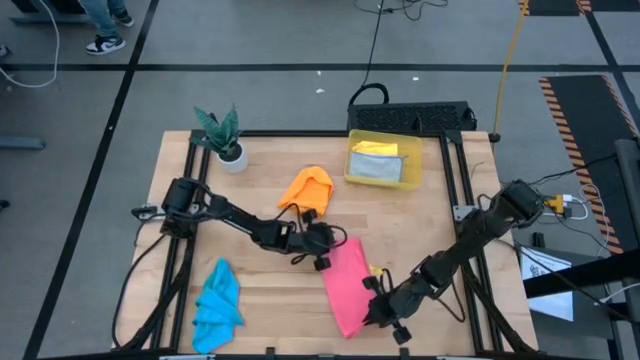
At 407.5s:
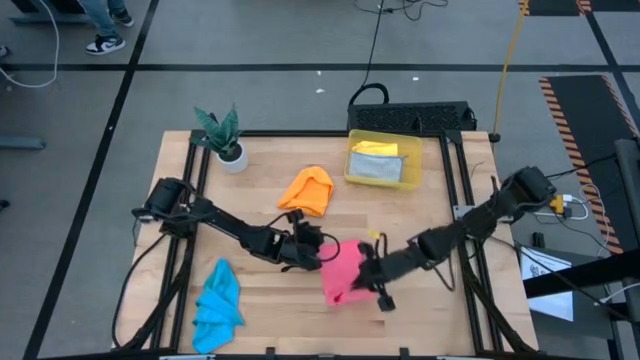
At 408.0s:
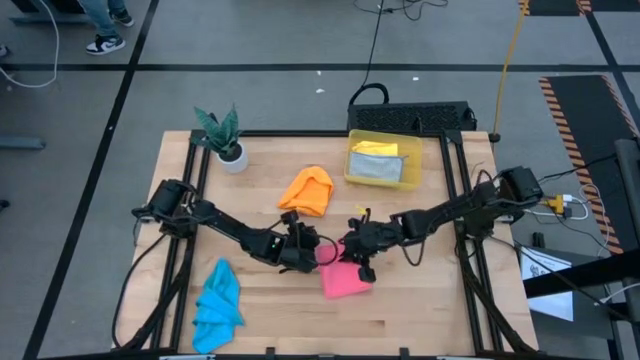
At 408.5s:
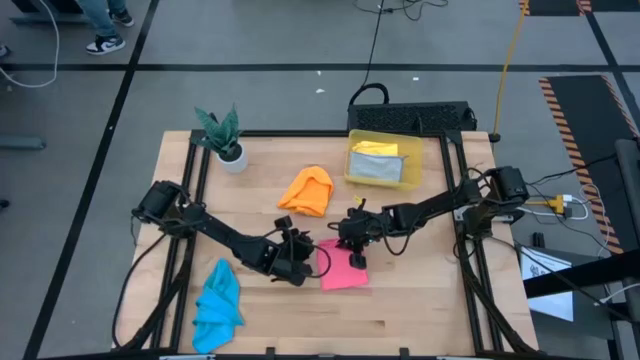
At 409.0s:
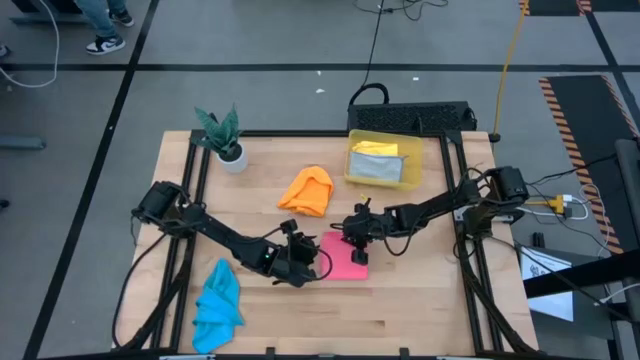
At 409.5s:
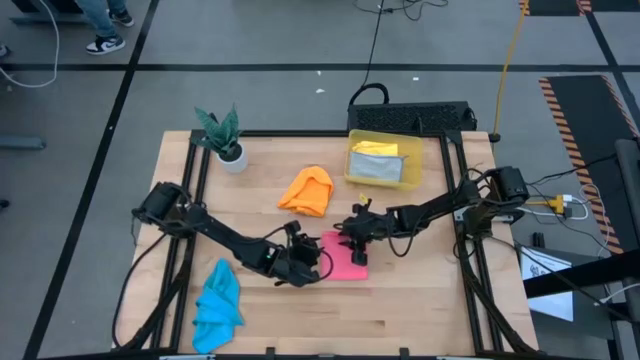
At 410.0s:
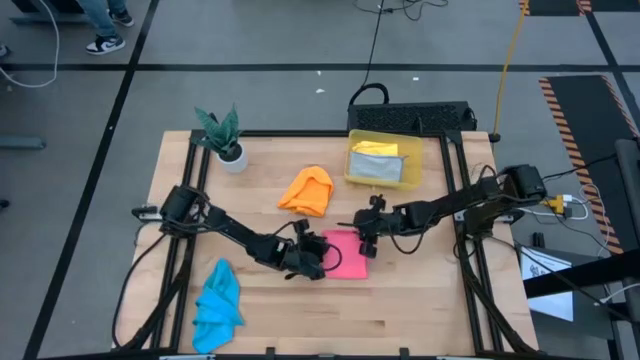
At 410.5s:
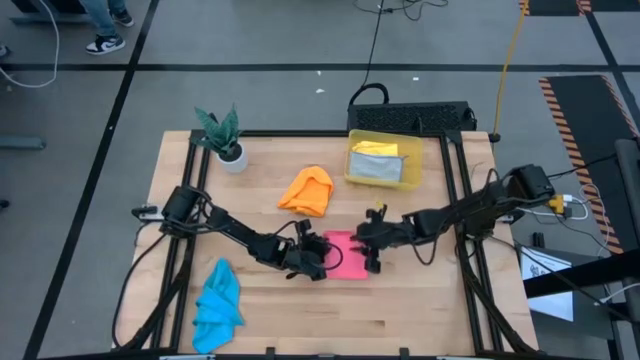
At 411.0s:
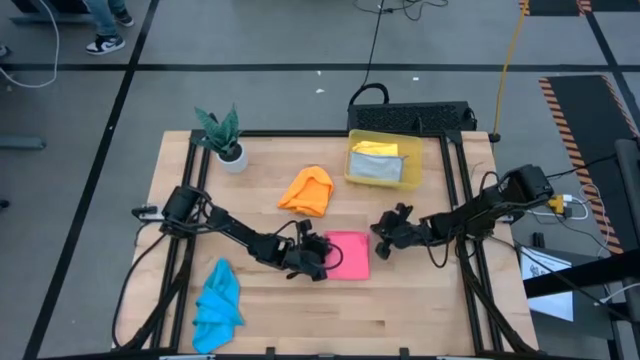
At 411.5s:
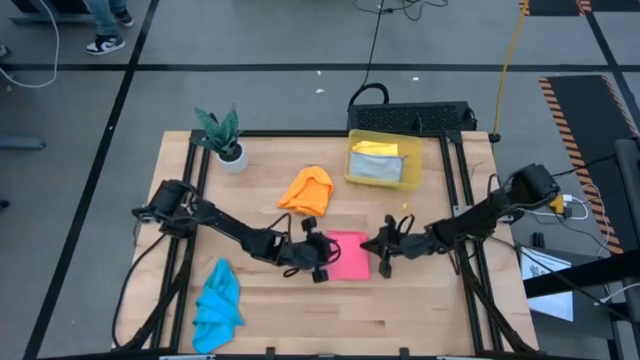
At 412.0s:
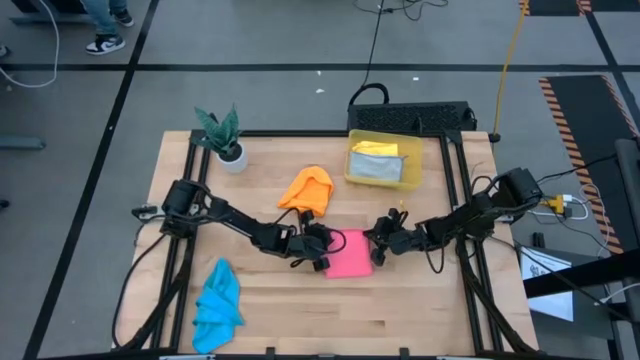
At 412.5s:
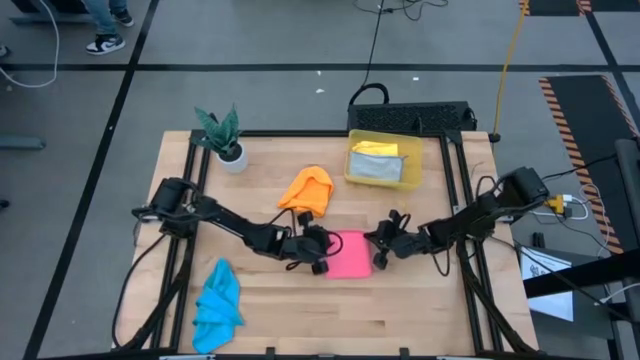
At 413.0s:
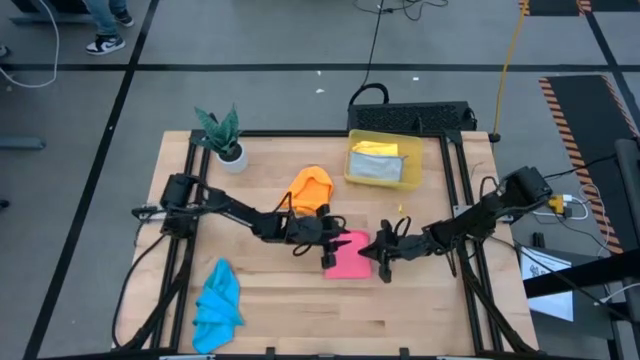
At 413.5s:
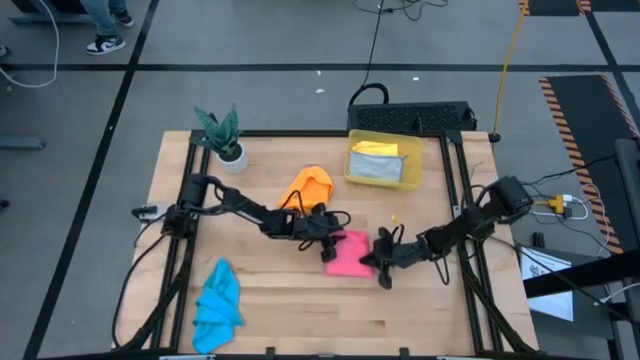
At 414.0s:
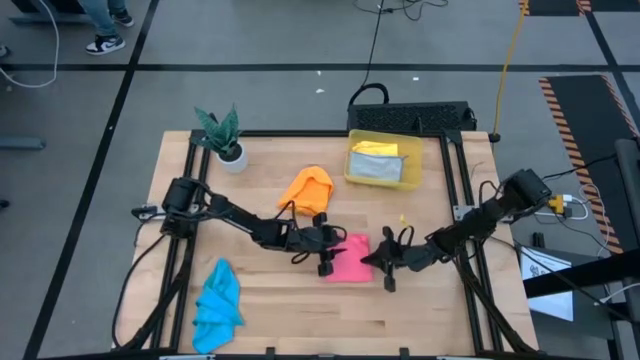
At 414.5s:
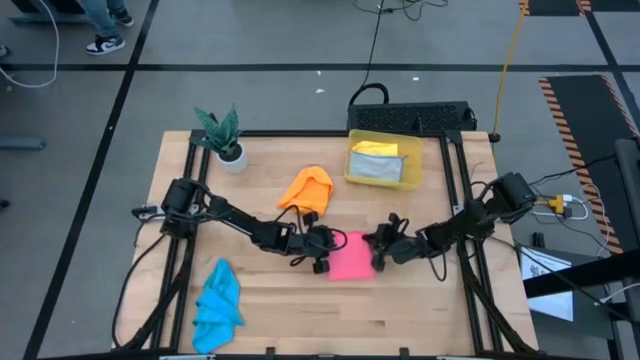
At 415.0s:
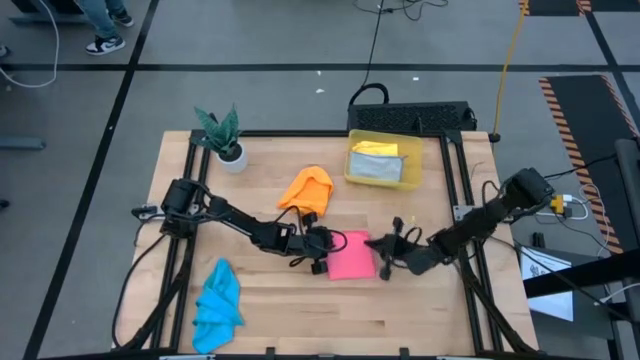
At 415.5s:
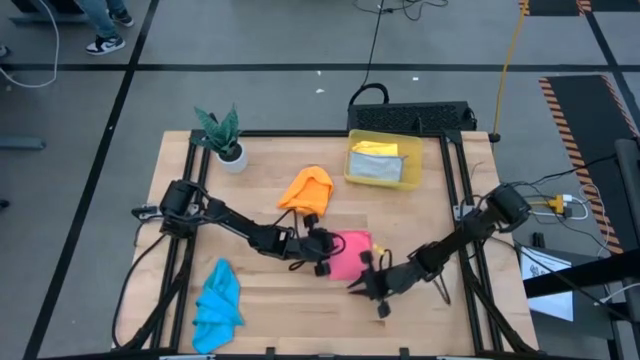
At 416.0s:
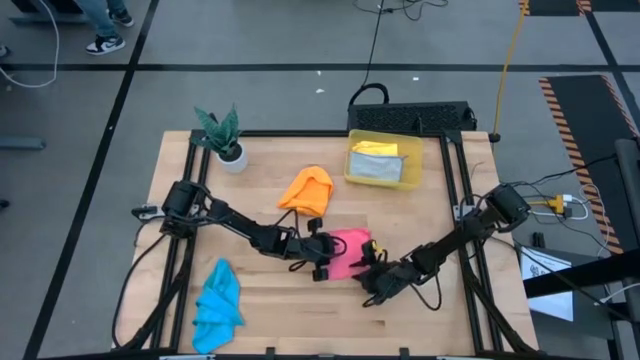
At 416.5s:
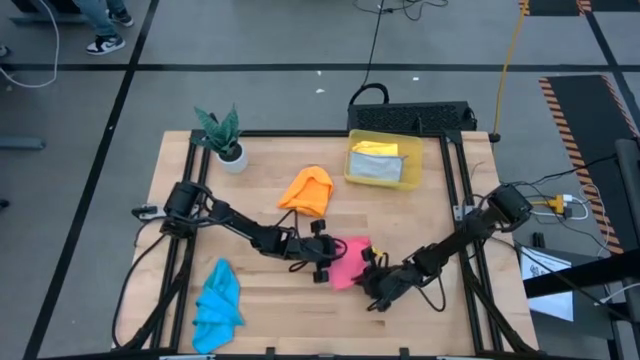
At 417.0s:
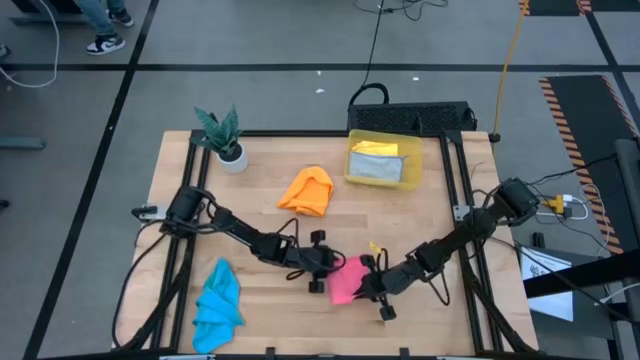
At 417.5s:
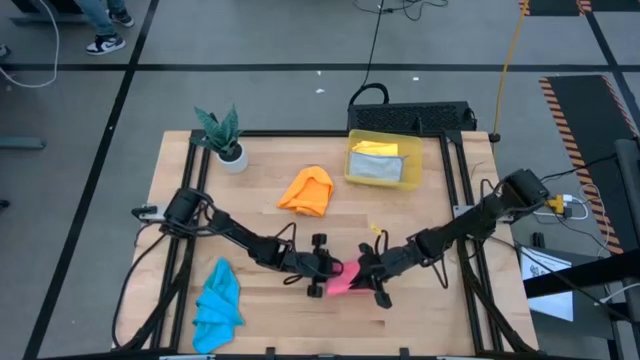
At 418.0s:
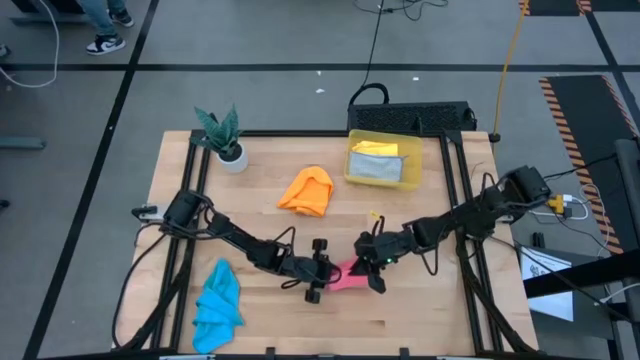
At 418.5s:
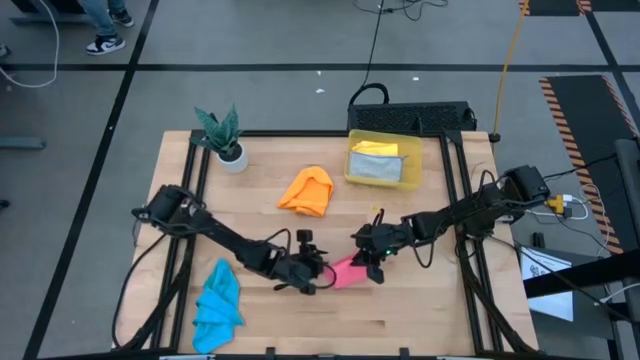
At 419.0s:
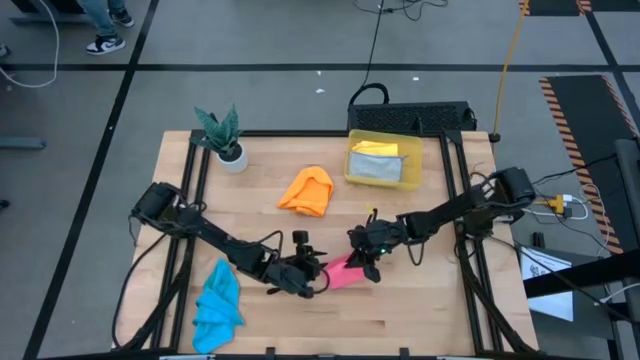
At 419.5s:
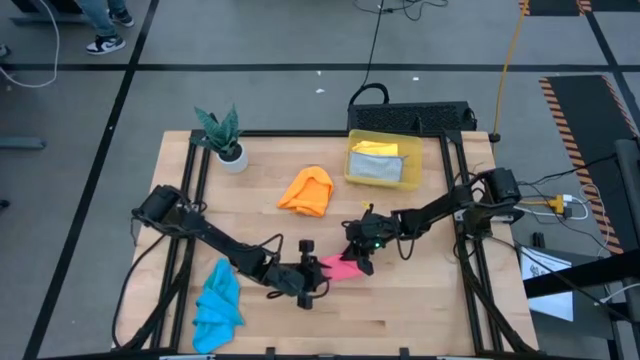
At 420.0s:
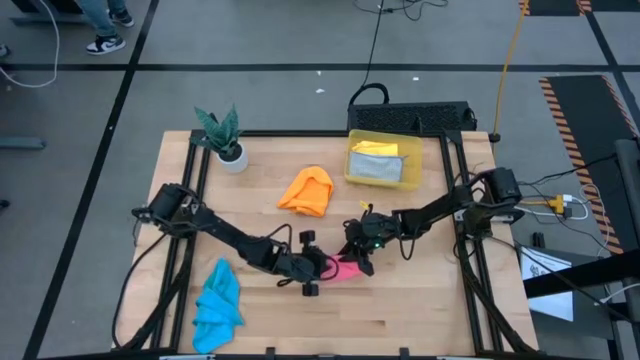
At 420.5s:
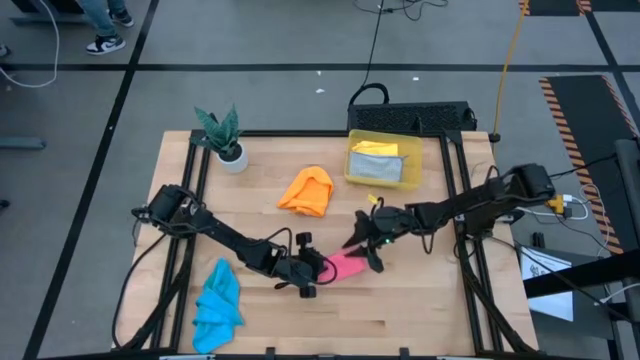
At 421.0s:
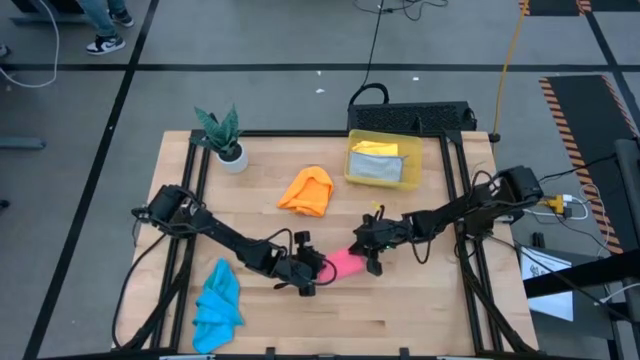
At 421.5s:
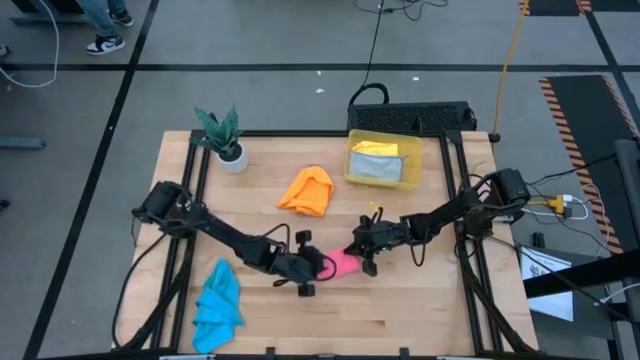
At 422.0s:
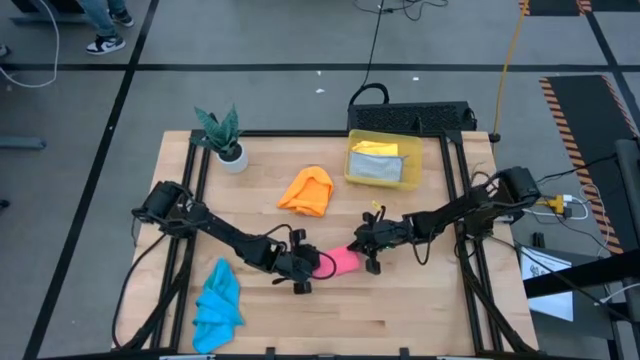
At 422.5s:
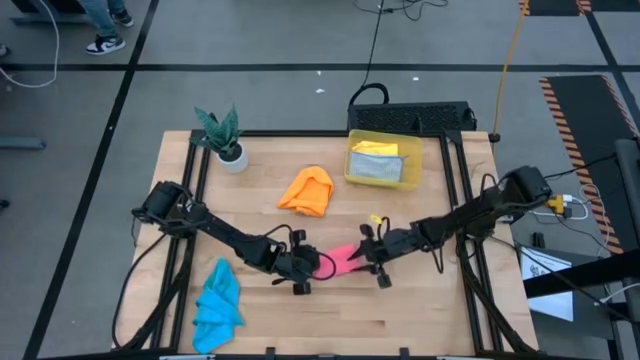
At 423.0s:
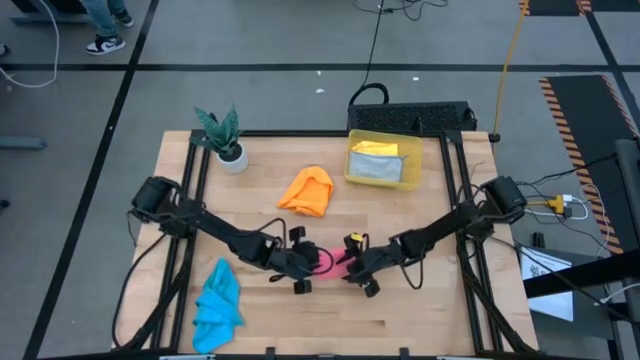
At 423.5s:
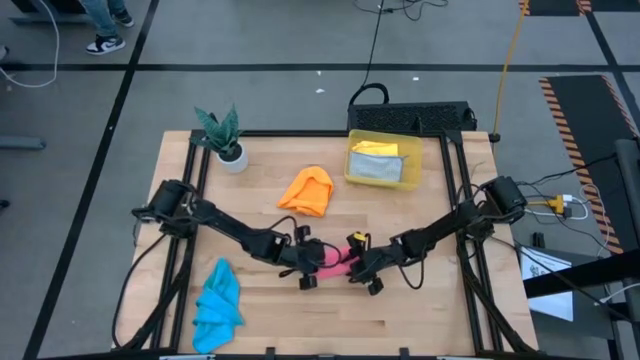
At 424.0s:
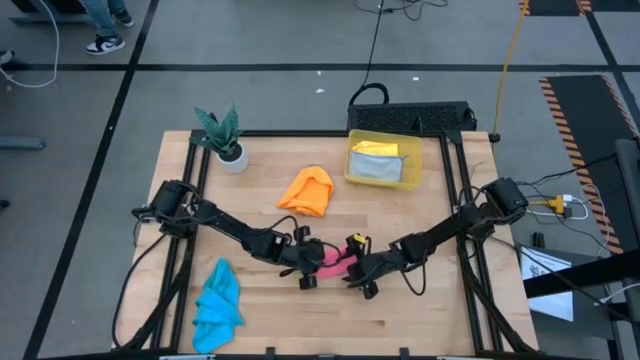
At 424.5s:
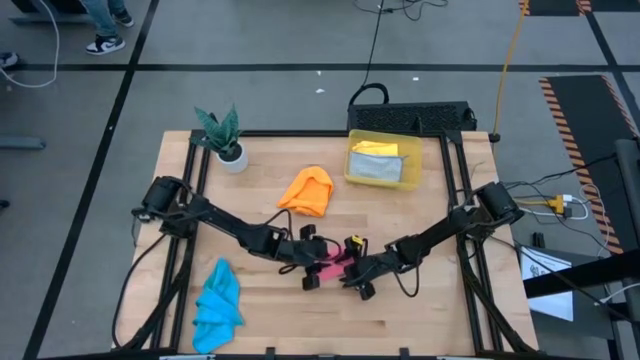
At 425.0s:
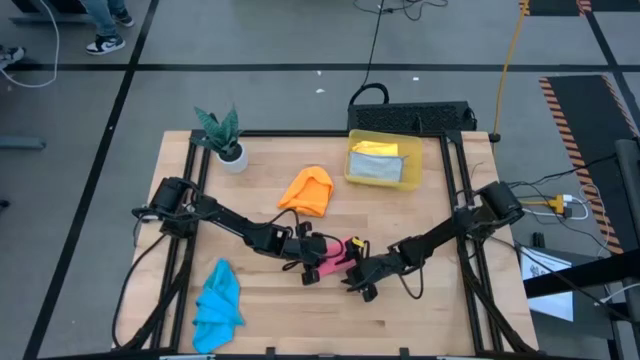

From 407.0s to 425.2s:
Task: Fold microfiber towels
Fold the pink kitchen towel

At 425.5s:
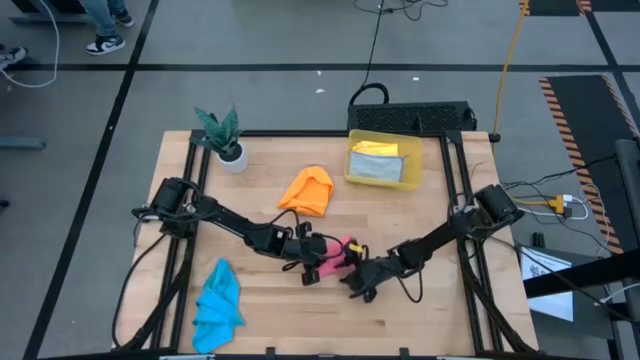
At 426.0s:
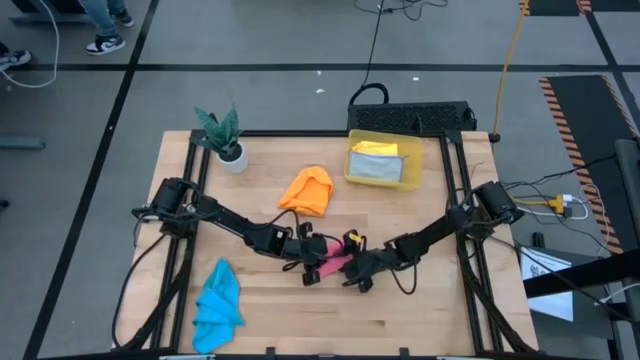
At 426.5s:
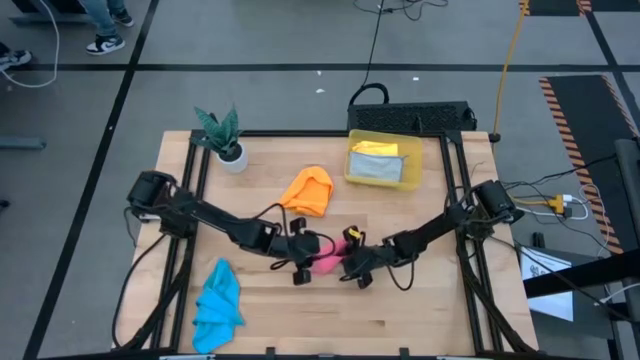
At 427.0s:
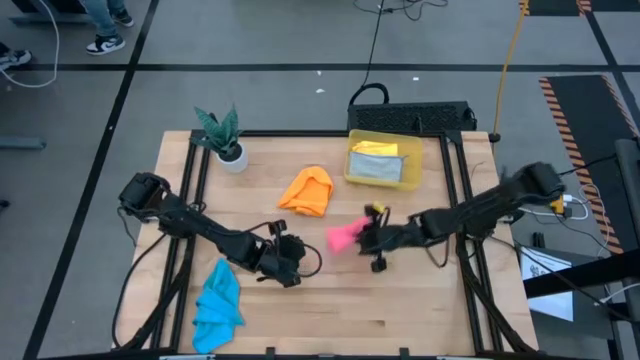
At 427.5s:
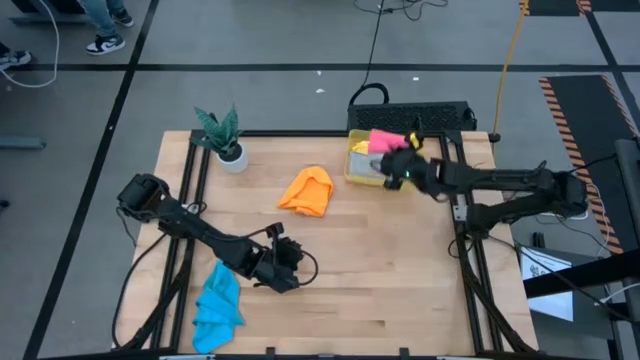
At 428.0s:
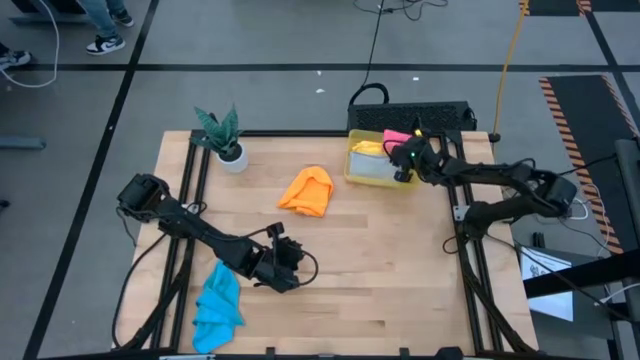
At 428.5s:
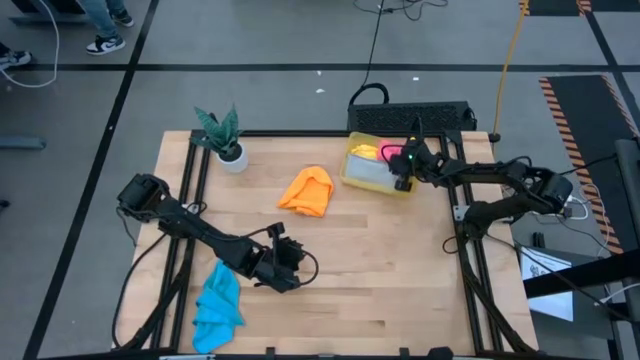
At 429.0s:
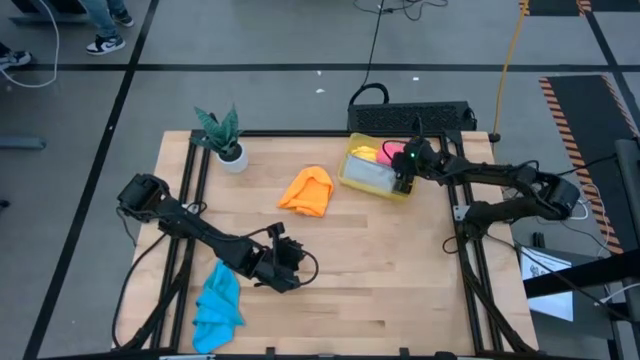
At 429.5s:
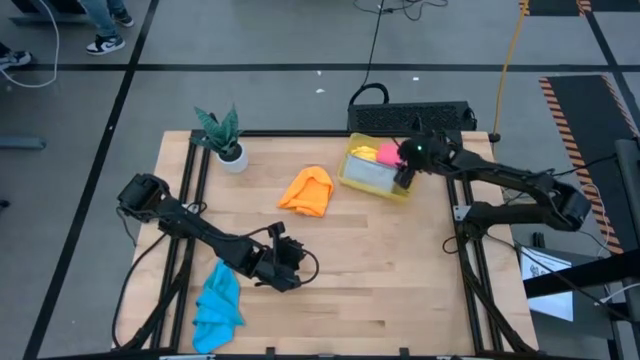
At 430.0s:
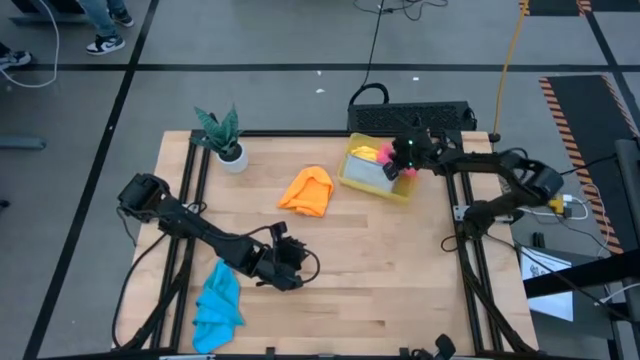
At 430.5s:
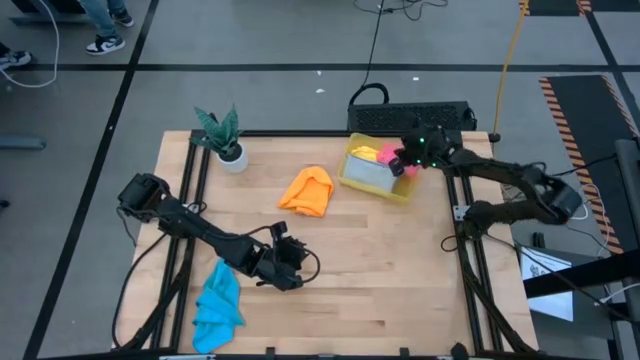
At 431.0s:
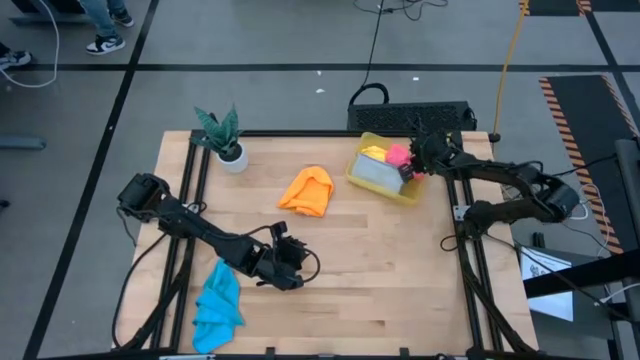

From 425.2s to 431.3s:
Put the pink kitchen towel into the yellow bin
